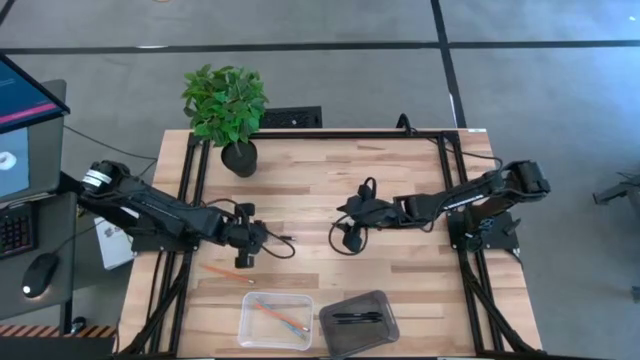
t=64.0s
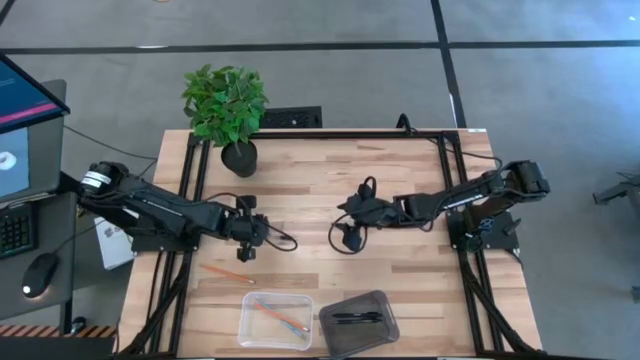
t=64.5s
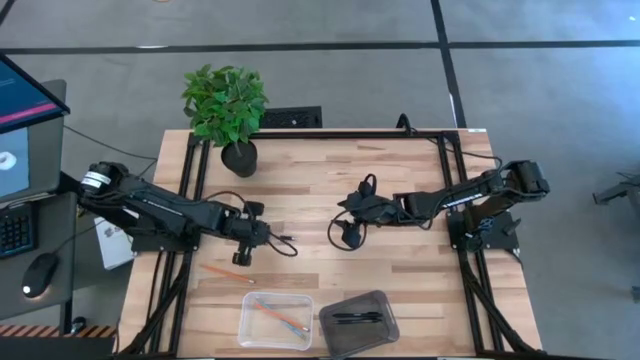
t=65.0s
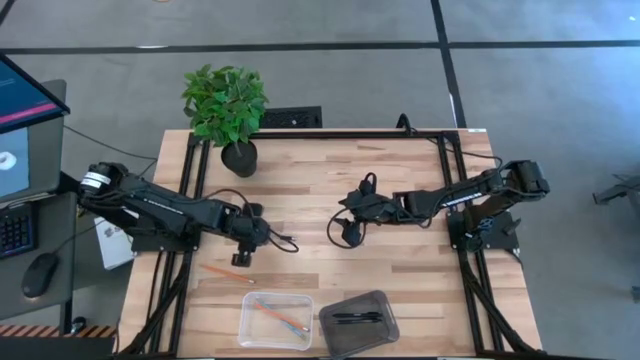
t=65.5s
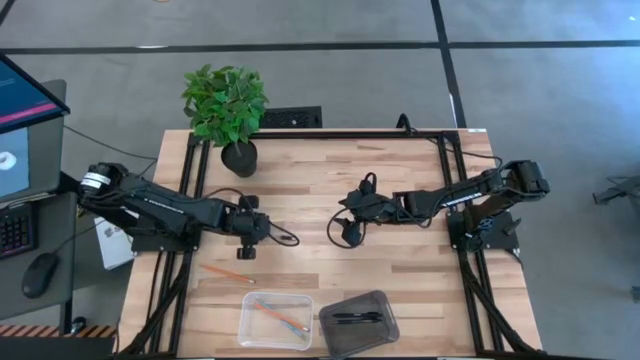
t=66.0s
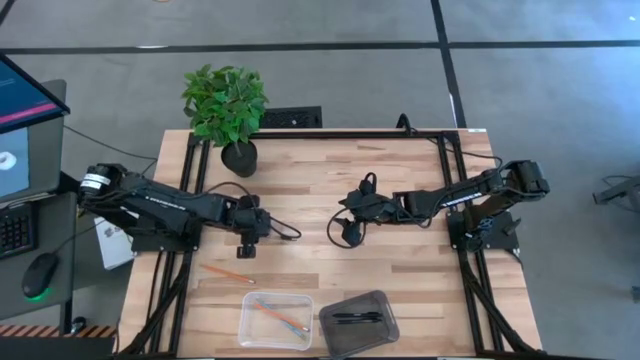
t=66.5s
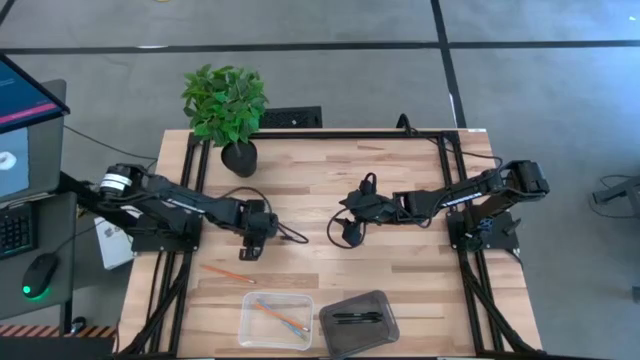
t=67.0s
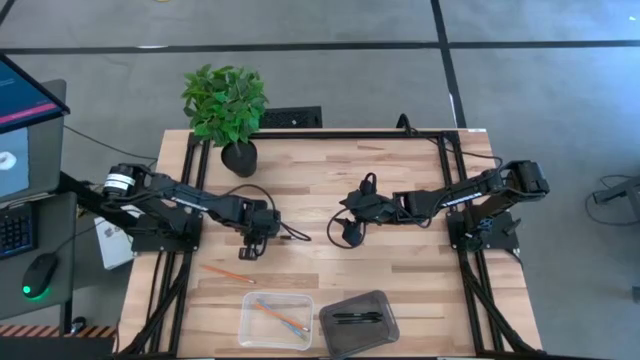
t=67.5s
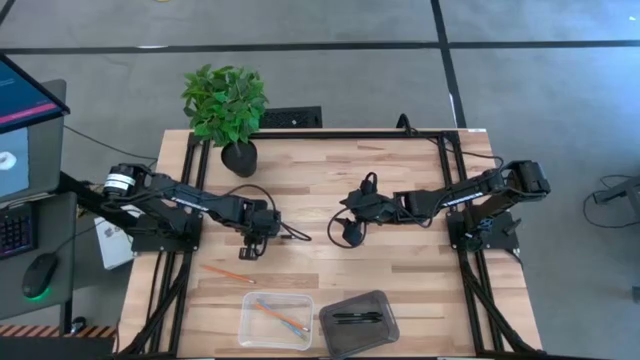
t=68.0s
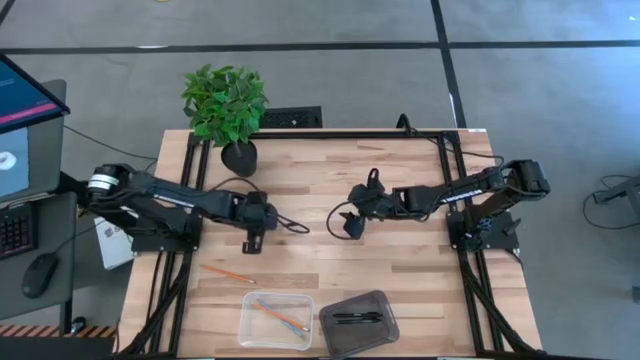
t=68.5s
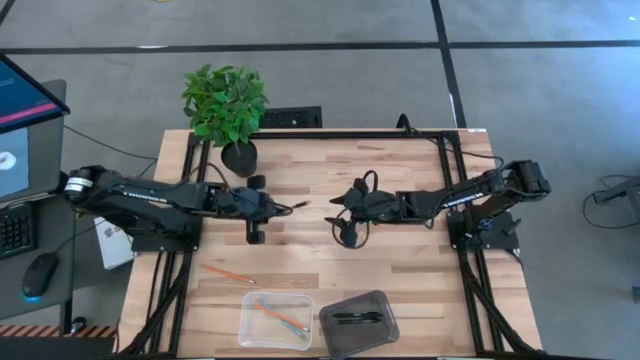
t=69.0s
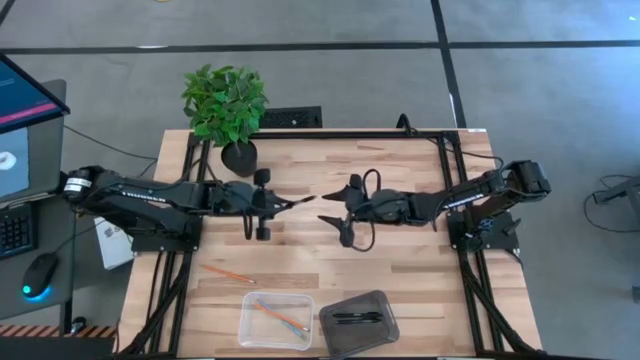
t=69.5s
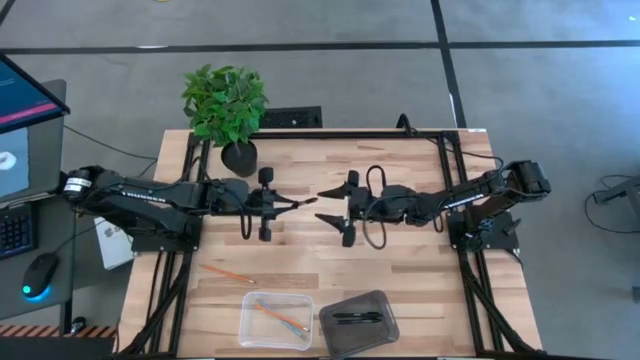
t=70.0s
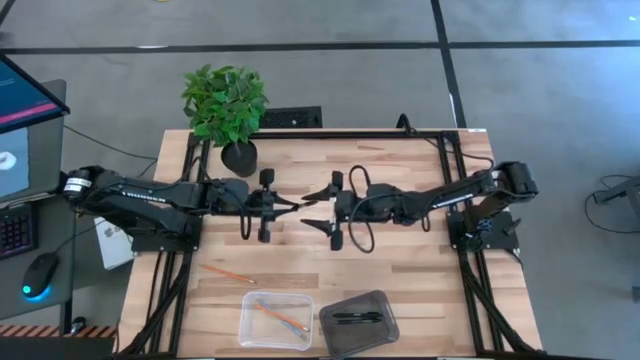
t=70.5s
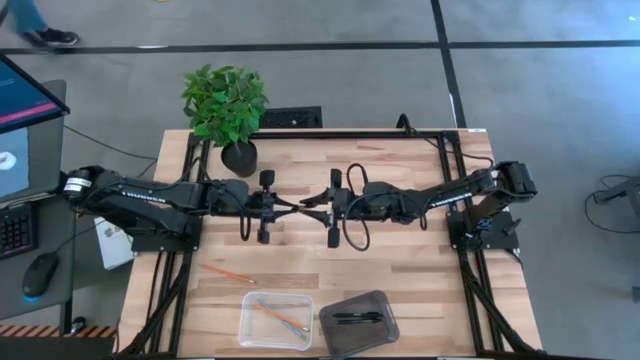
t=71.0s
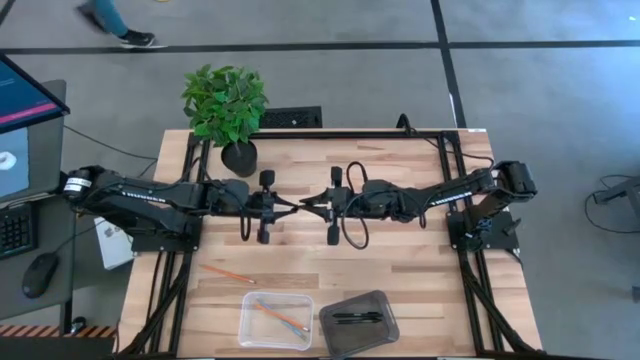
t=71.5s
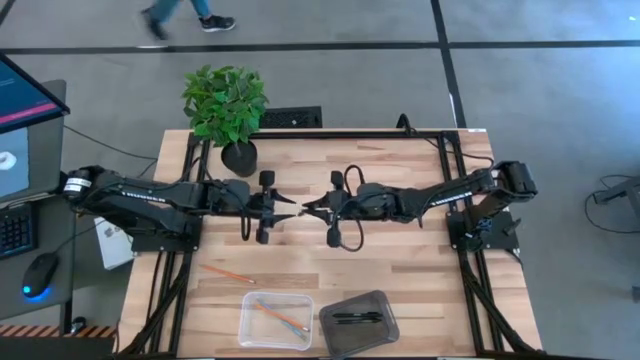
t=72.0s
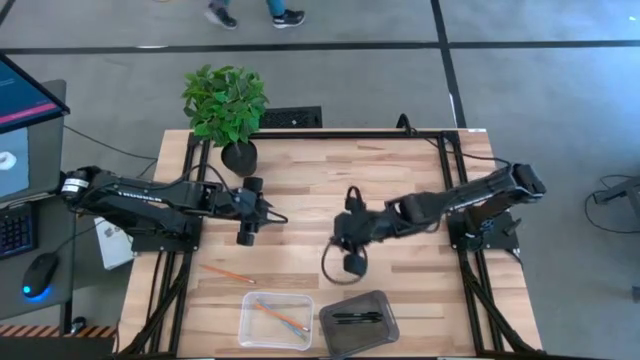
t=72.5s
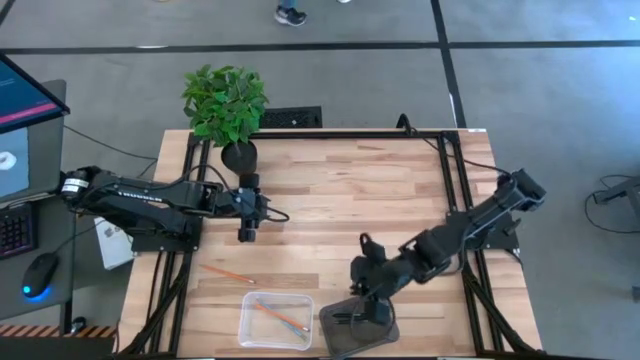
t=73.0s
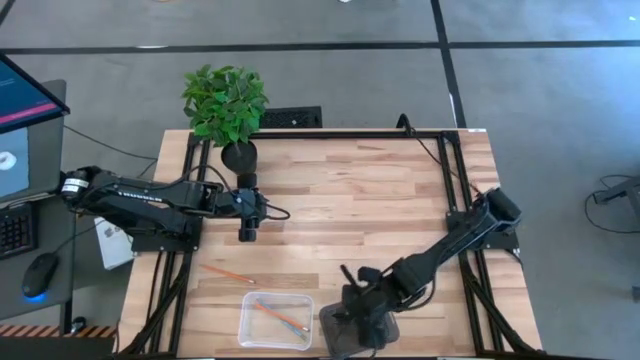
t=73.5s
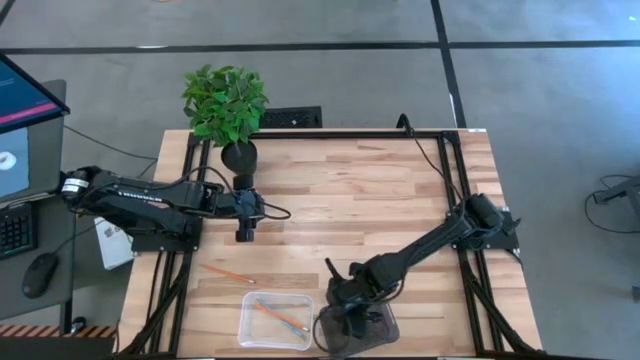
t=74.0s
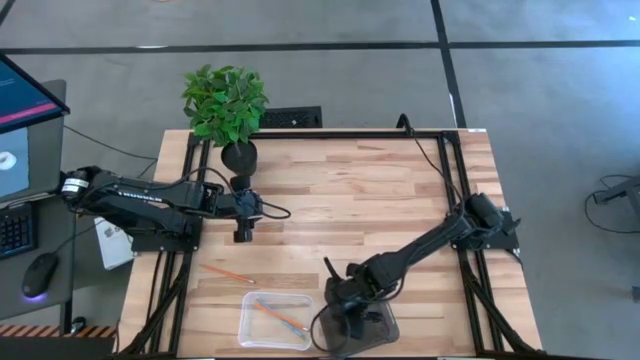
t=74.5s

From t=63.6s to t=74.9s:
Task: Sort pens & pencils
Put the black pen into the black bin

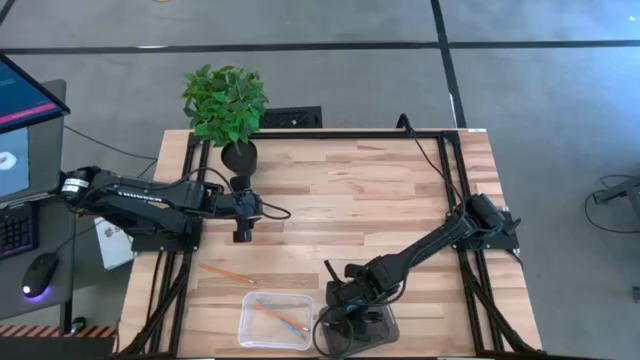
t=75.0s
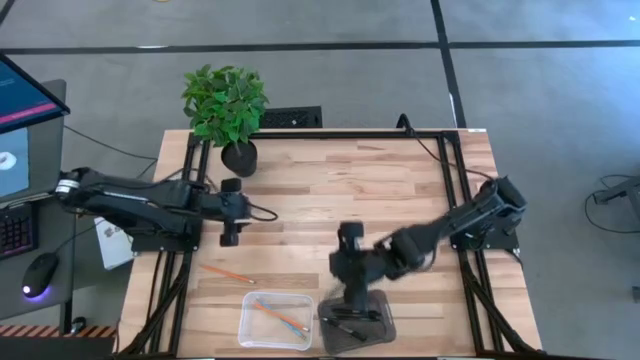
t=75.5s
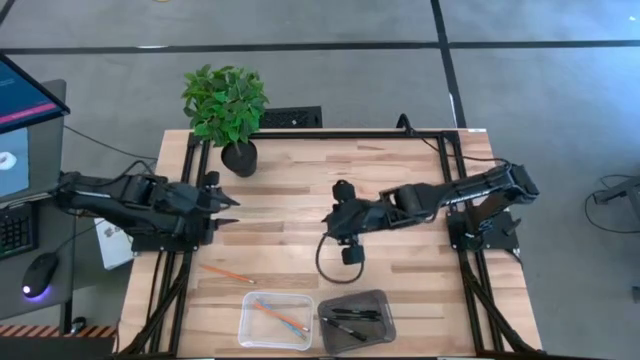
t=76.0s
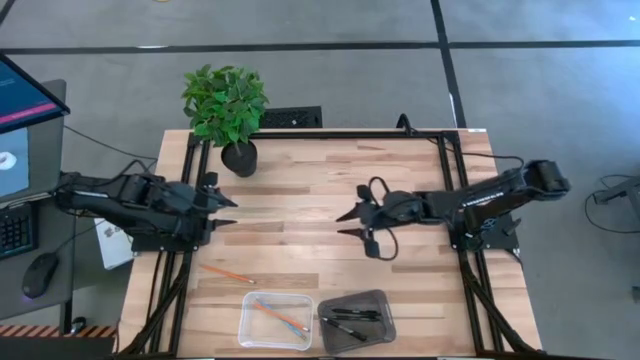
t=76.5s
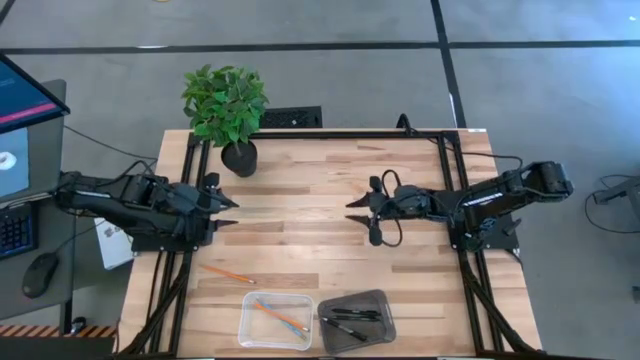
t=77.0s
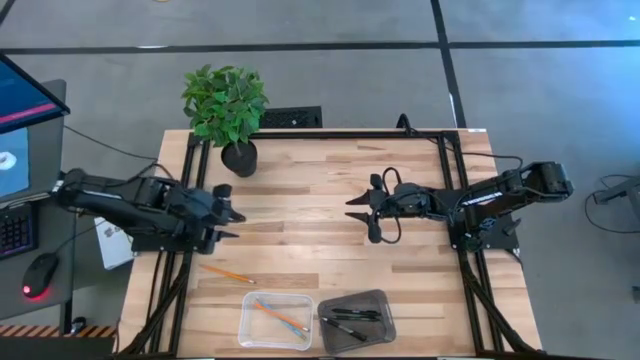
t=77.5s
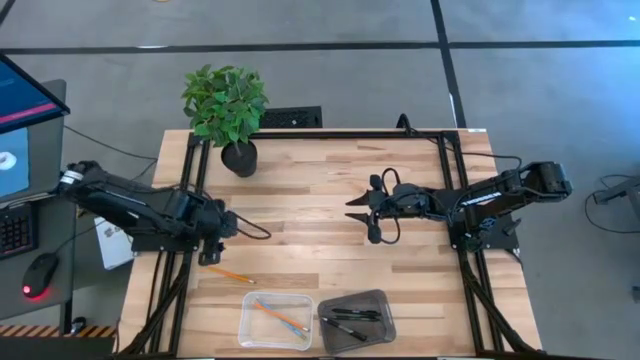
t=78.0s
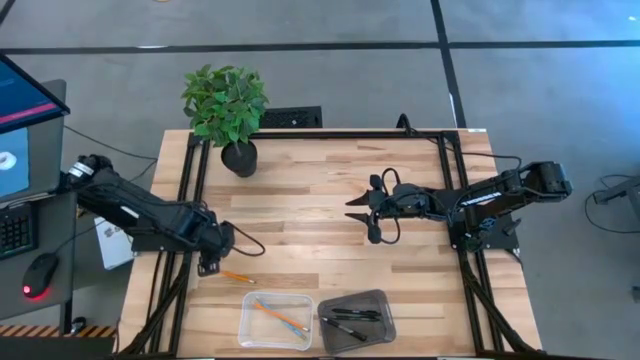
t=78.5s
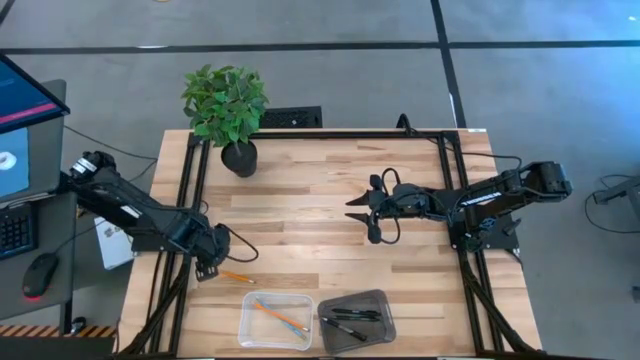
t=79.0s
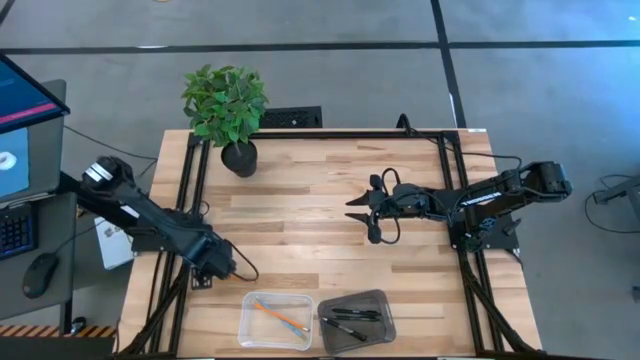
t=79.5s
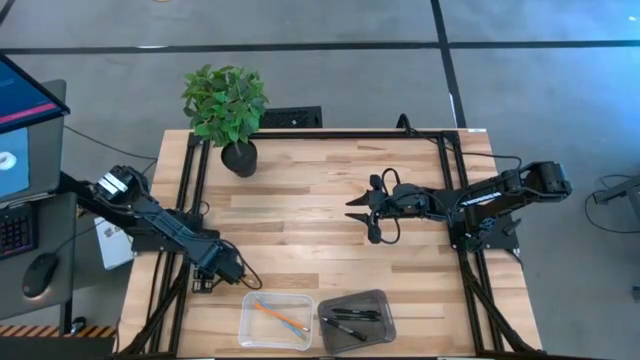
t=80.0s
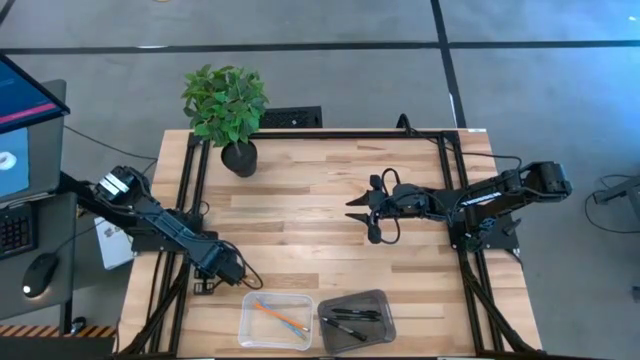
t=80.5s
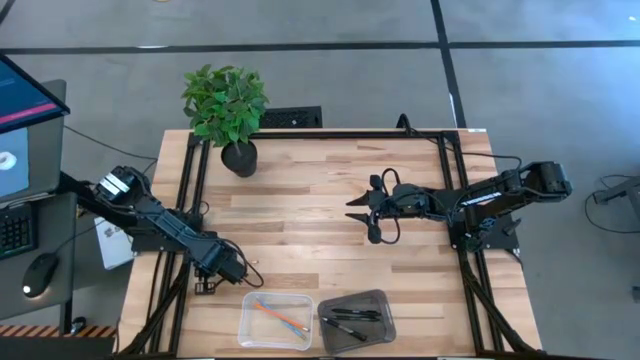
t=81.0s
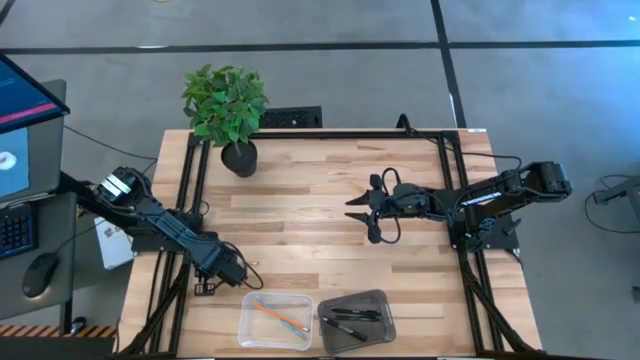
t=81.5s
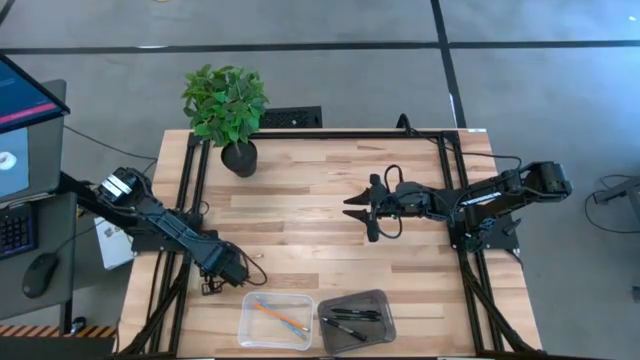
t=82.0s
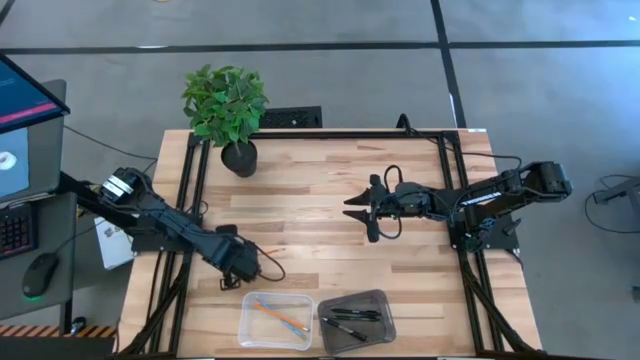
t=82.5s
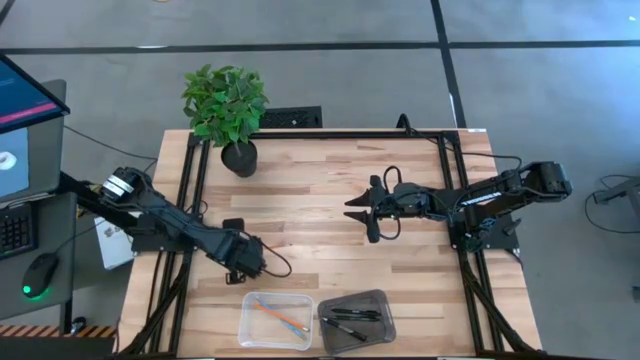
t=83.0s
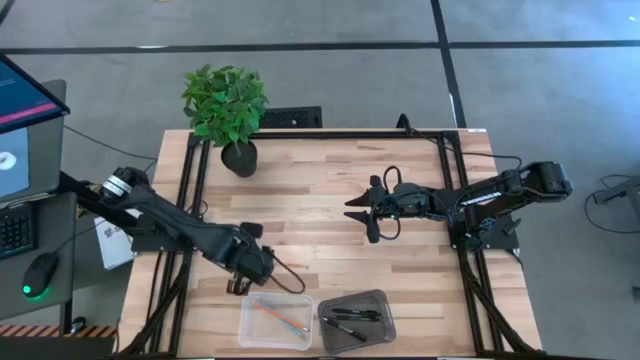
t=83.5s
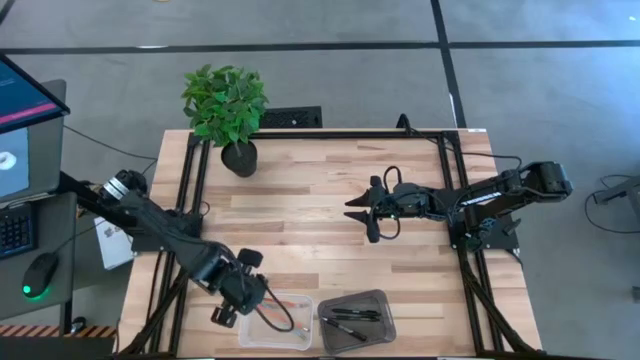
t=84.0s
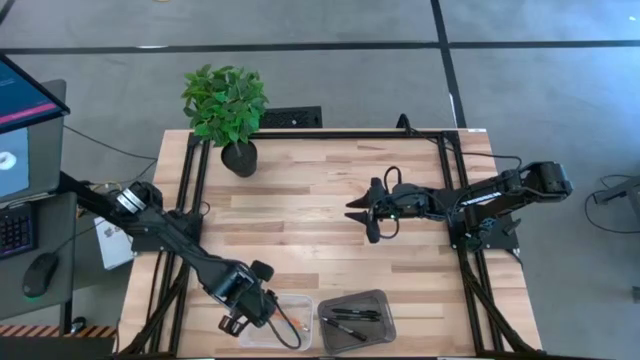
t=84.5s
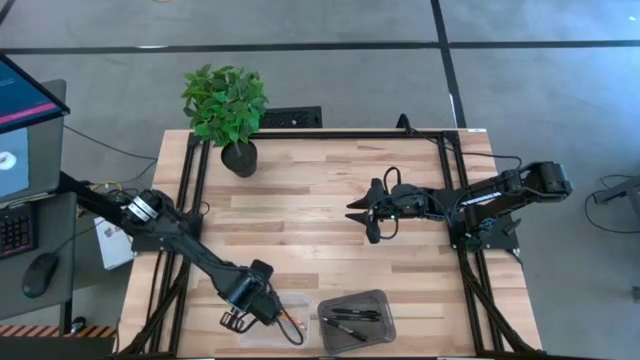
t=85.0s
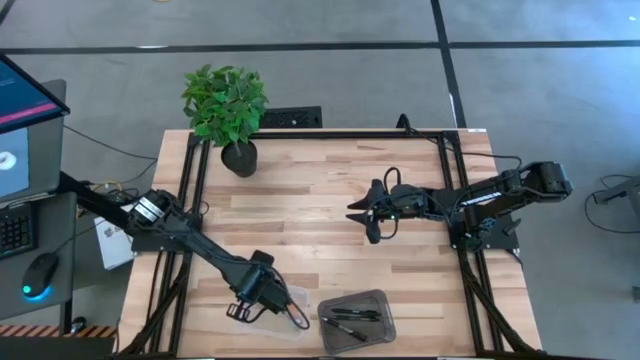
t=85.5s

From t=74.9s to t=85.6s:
Put the orange pencil into the transparent bin
